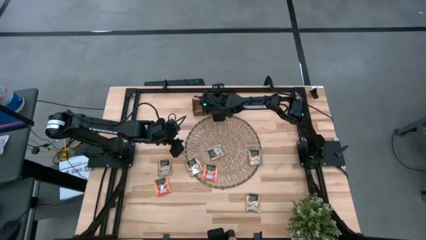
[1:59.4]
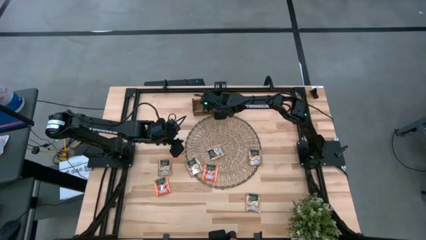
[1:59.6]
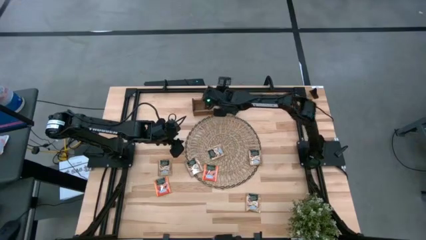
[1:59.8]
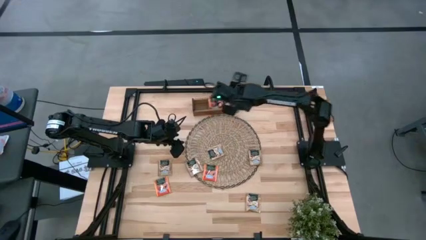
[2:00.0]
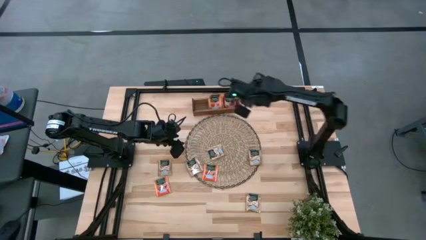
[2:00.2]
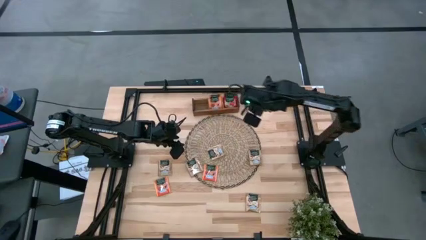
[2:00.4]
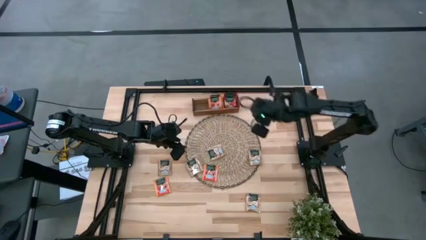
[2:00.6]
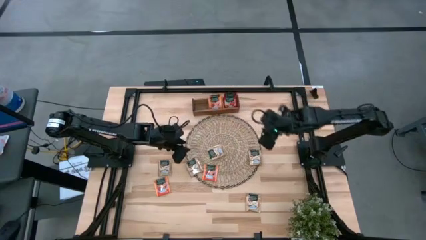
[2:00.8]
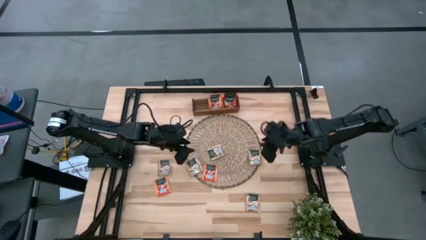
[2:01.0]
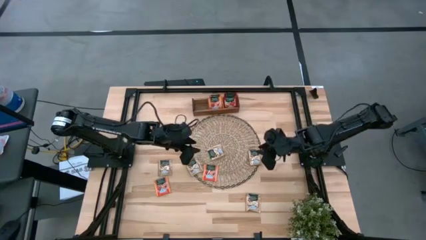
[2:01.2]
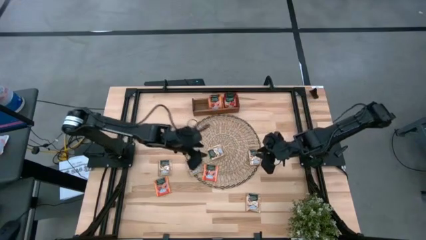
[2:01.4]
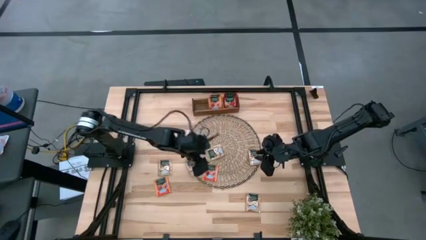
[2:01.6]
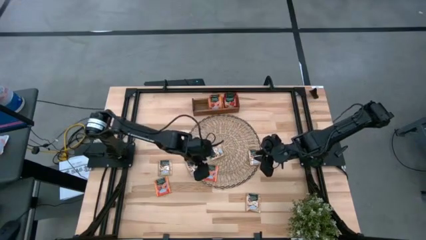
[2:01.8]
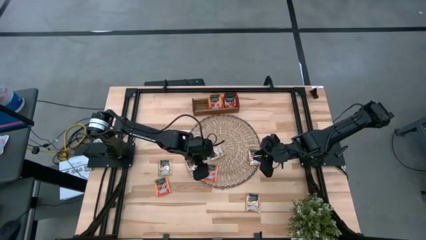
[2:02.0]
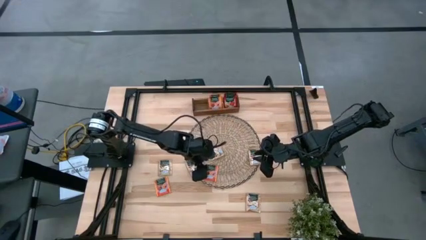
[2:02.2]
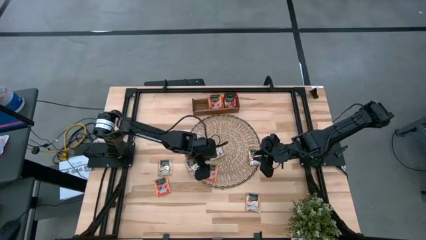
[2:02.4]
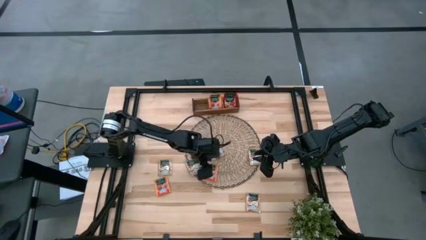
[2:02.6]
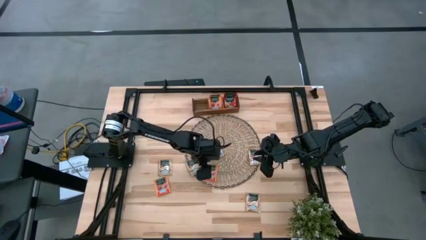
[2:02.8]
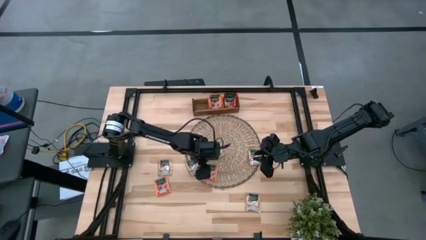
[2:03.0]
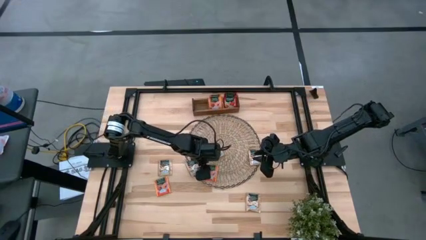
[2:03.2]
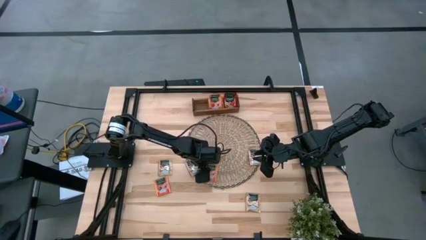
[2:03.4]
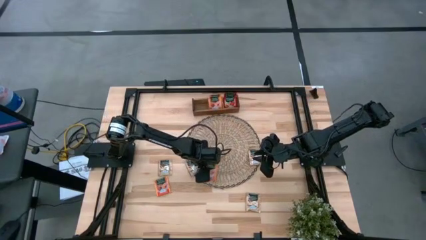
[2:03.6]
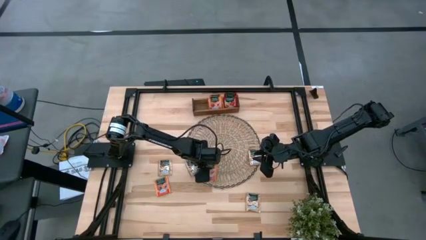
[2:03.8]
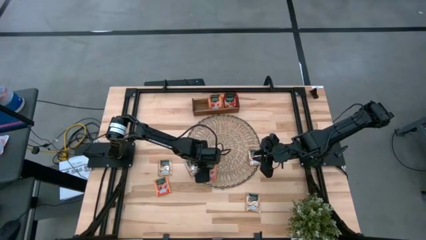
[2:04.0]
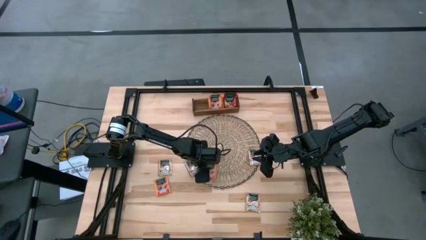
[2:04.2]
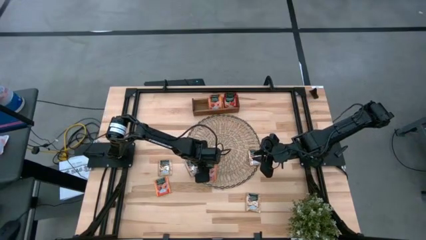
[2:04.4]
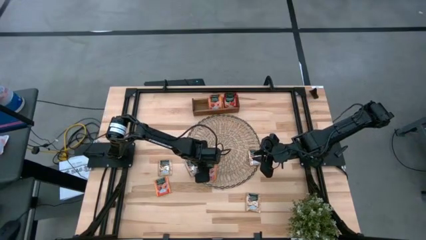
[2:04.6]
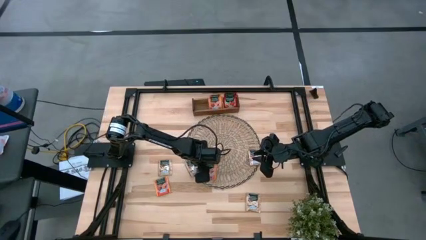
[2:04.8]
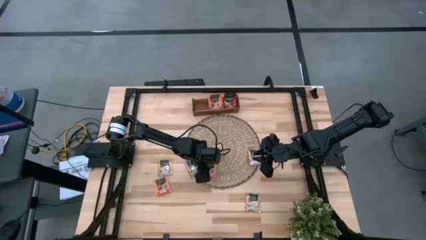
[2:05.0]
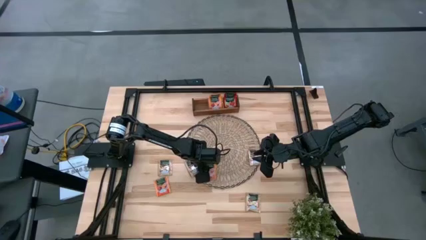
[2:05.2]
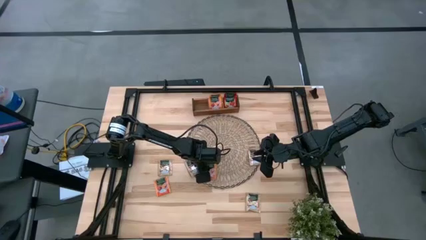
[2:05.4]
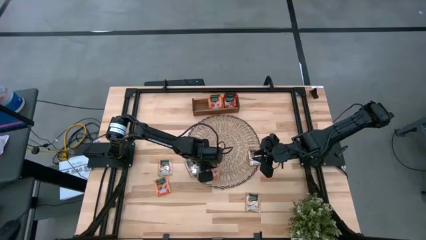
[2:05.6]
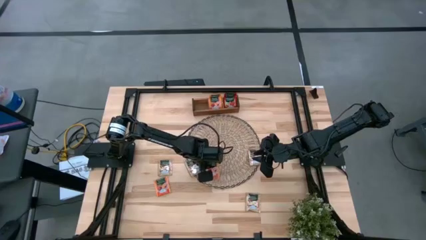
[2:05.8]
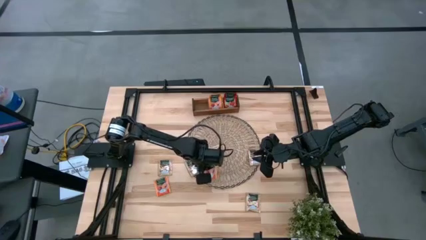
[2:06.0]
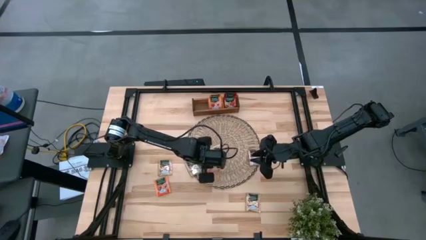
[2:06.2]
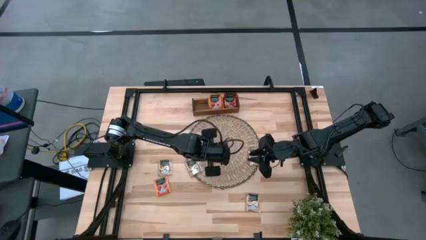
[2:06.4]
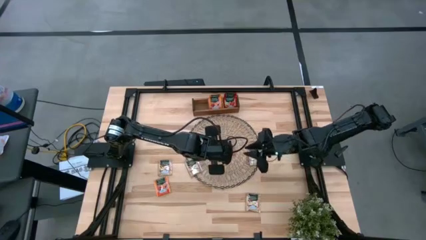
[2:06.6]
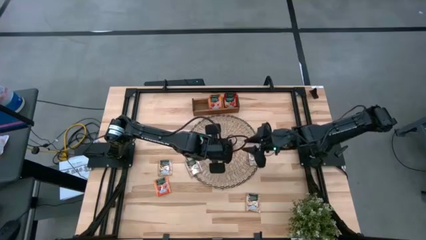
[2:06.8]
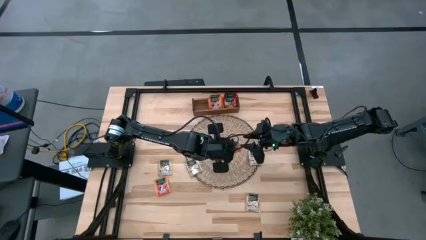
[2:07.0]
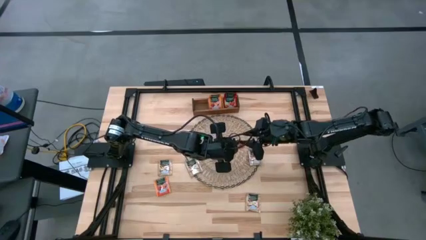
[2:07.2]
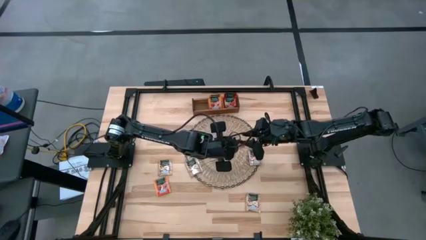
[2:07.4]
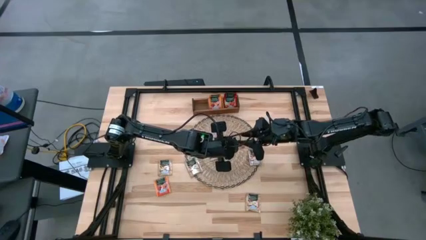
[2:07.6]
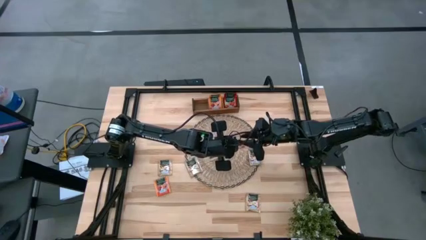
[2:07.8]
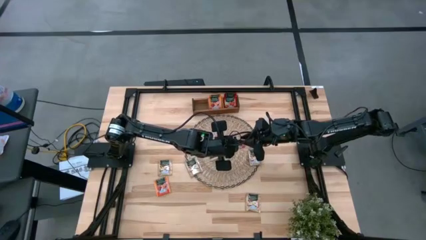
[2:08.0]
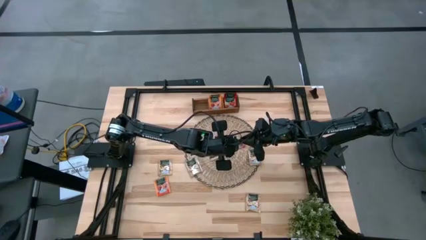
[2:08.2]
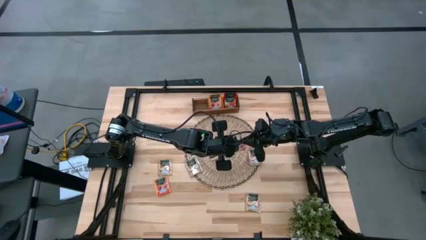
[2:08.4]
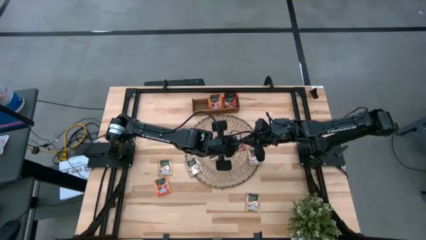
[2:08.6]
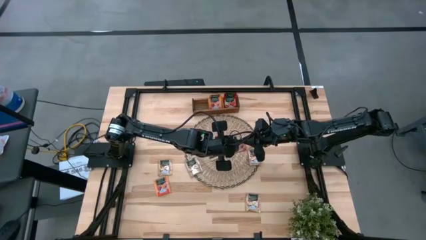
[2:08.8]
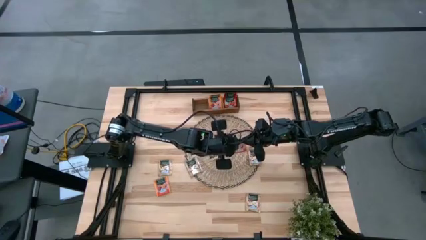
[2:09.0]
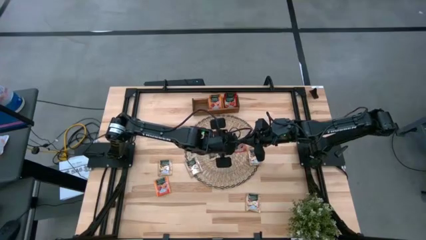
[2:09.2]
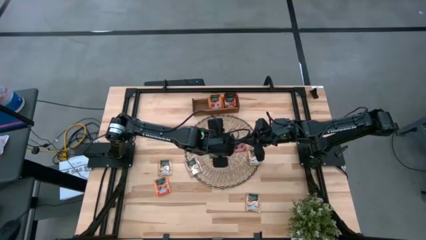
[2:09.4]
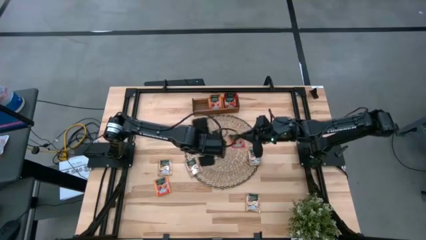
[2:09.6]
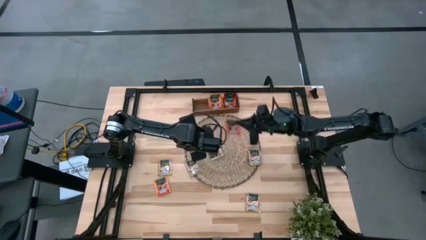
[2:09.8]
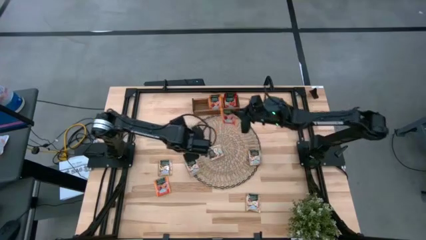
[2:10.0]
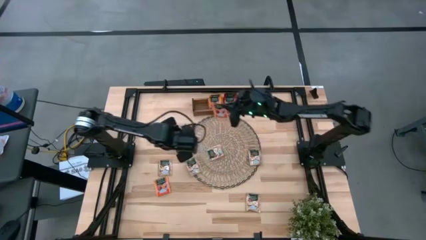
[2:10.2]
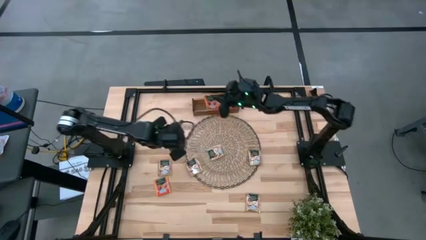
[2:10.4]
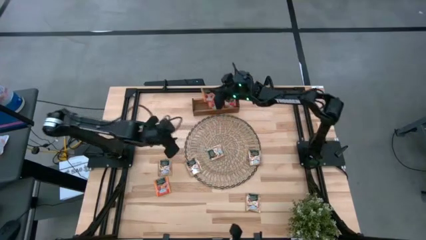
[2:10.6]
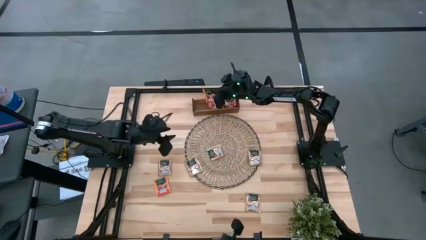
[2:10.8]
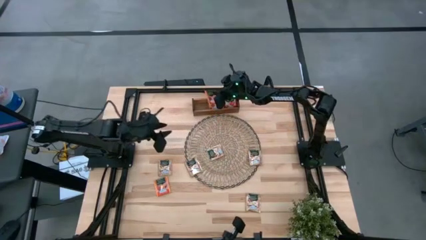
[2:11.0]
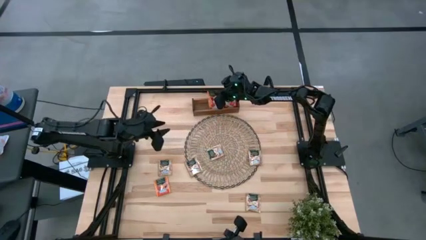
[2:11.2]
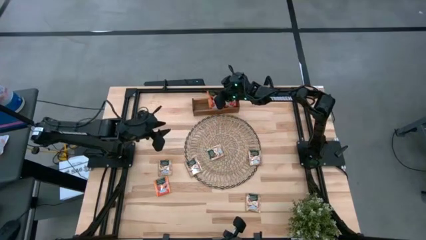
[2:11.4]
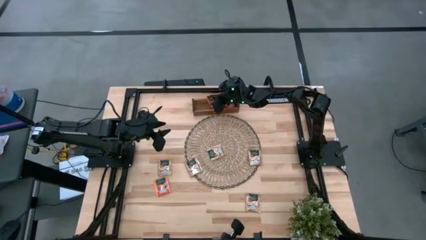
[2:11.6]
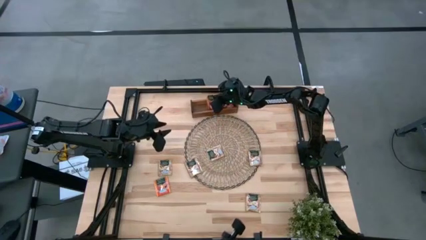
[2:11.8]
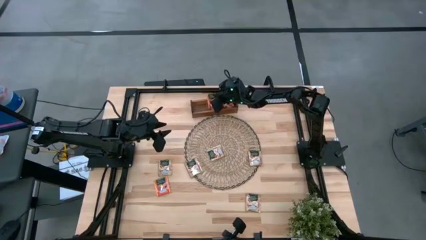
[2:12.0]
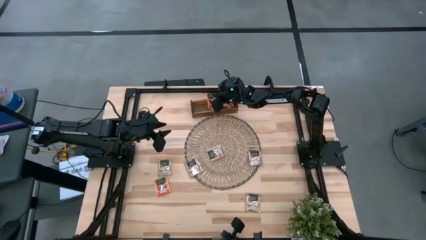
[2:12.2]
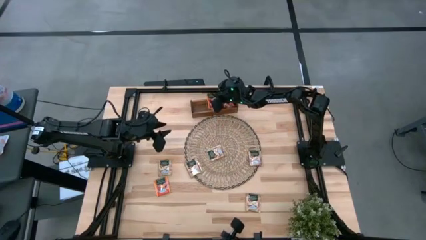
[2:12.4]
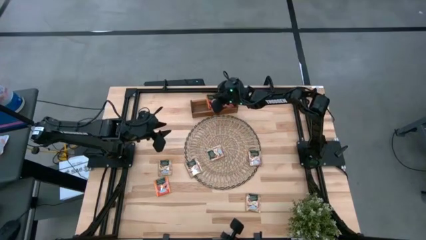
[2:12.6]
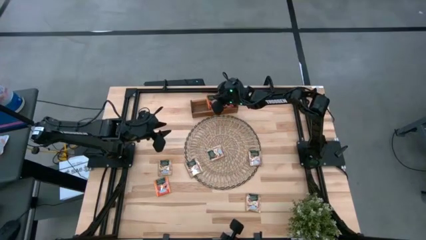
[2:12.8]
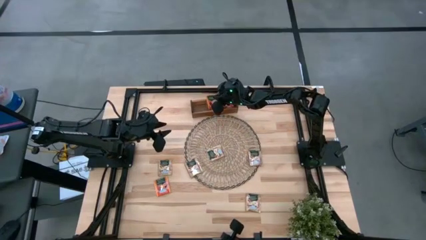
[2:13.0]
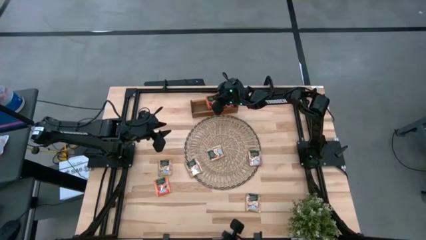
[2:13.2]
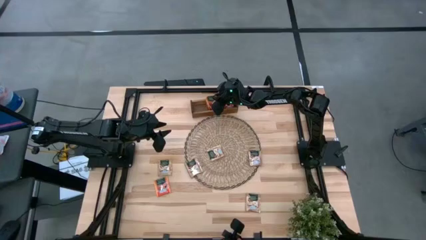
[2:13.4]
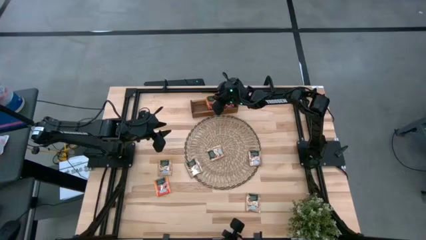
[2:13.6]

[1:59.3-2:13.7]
Task: Pick & Place Tea
Put the orange tea bag into the middle section of the wooden organizer
